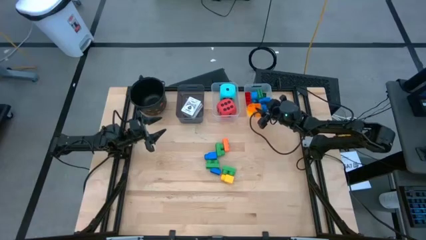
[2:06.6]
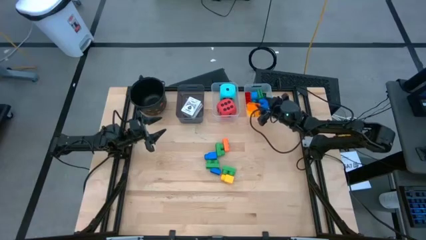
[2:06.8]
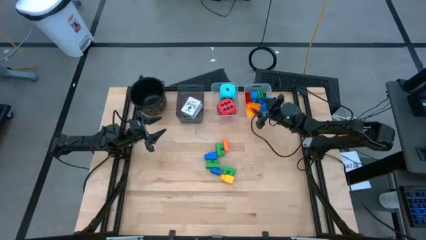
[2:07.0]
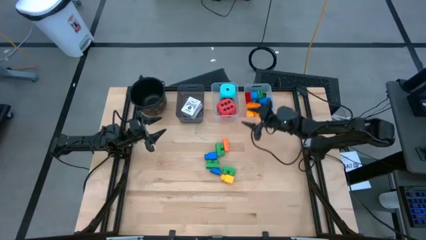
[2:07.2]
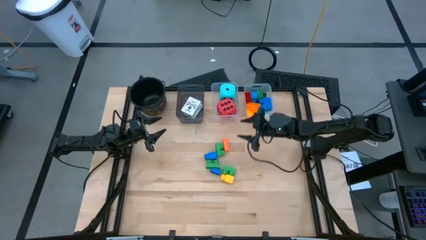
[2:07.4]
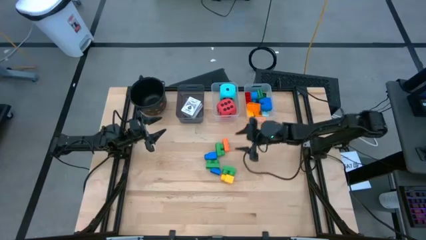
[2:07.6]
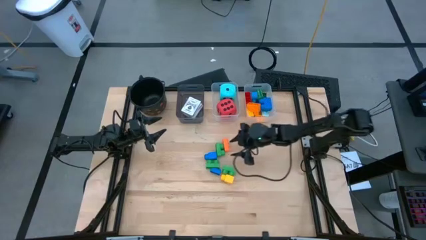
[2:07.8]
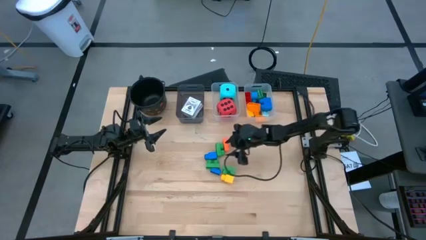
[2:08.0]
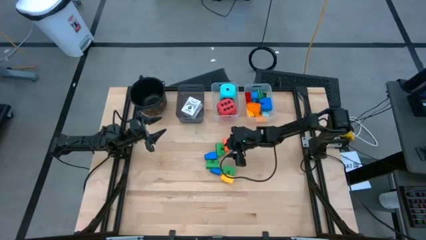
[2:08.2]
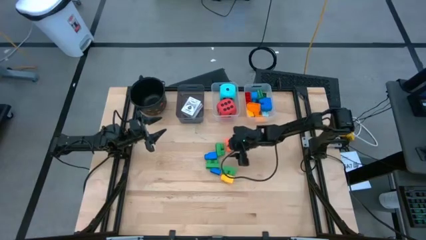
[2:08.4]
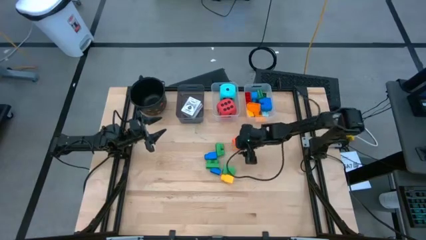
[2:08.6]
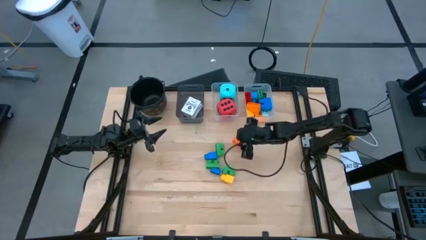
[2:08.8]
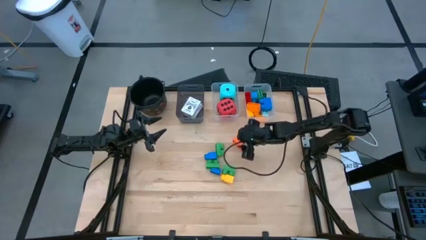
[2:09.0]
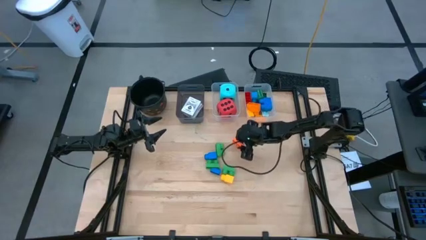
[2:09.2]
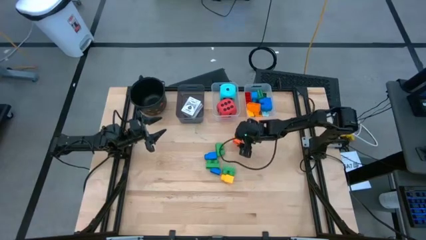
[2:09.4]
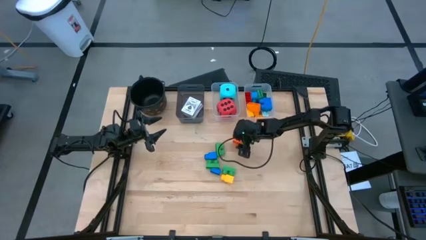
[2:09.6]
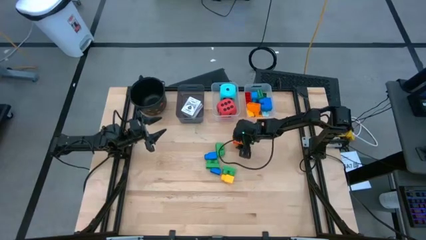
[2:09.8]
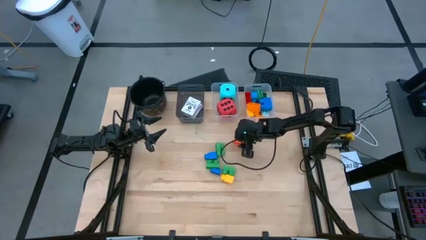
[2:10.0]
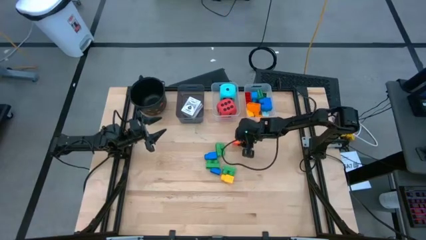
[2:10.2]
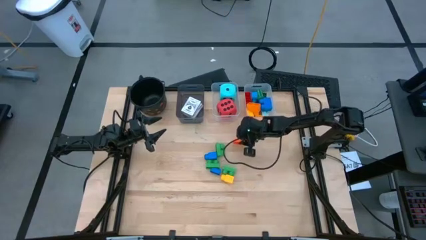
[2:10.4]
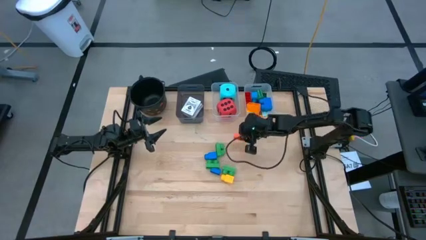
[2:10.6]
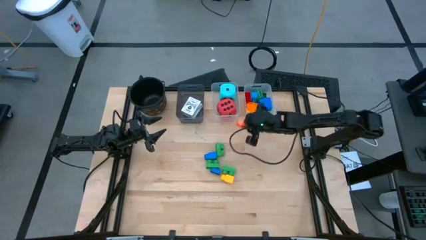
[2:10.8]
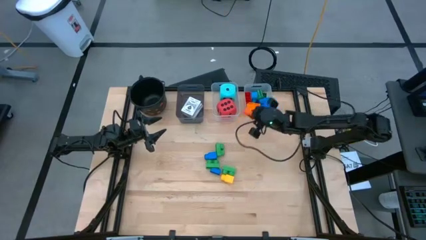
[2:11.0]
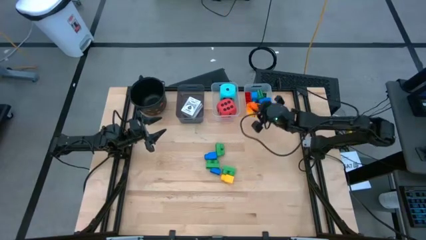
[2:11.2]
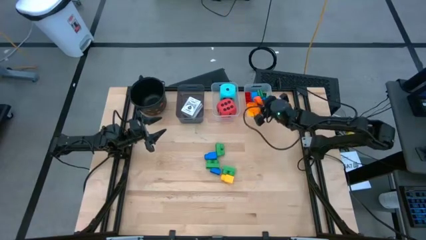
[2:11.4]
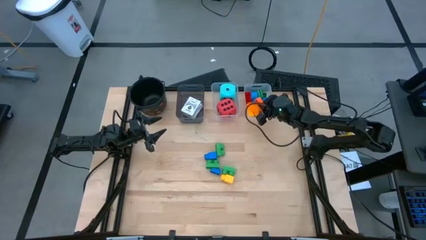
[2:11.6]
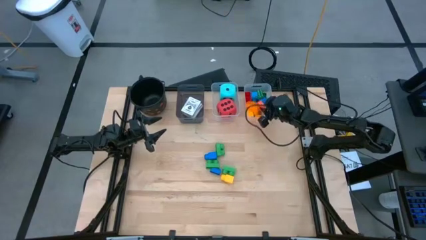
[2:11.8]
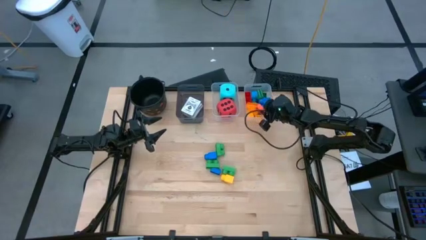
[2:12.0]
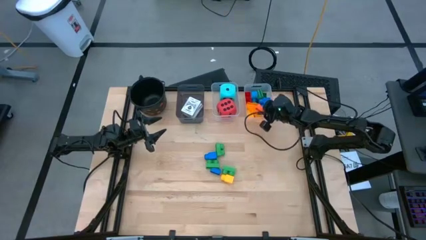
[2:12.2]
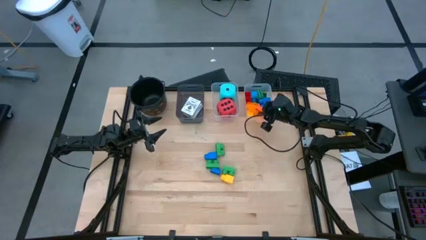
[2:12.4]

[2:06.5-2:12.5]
Task: Pick & Place Toys
Put the orange block into the right transparent bin

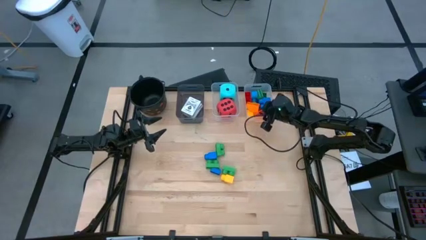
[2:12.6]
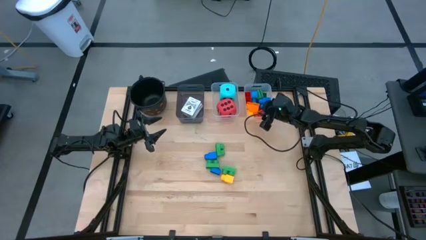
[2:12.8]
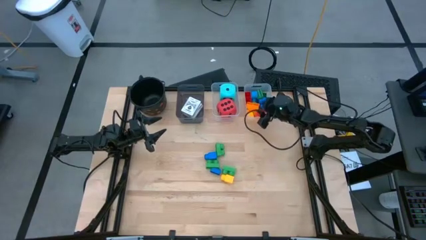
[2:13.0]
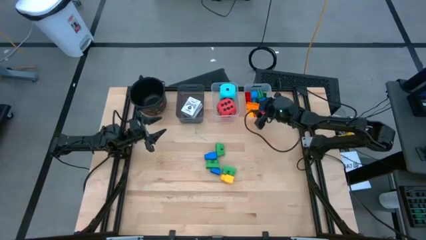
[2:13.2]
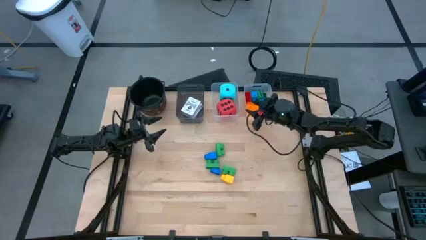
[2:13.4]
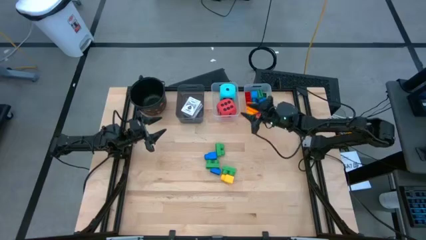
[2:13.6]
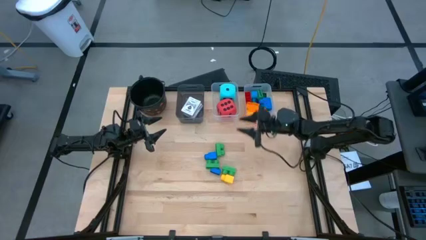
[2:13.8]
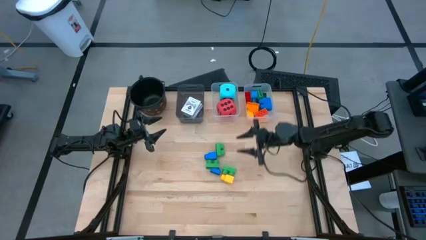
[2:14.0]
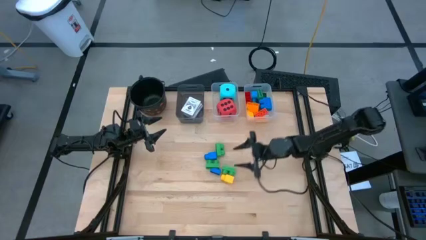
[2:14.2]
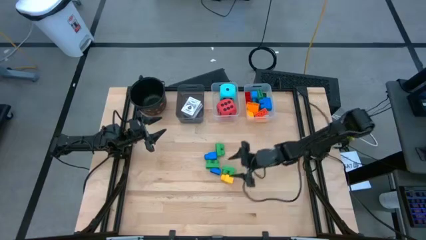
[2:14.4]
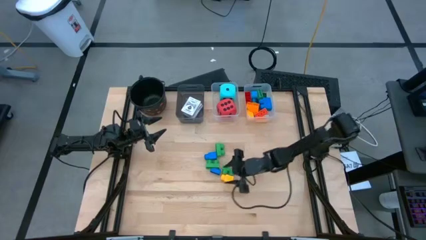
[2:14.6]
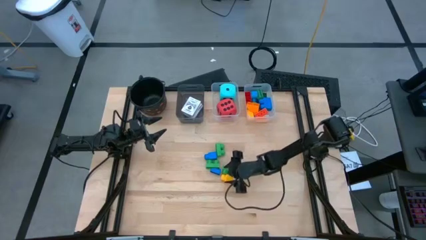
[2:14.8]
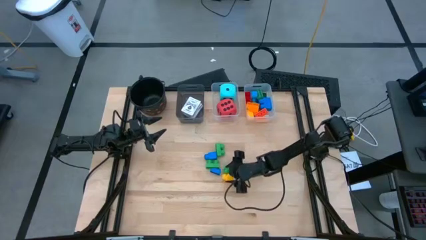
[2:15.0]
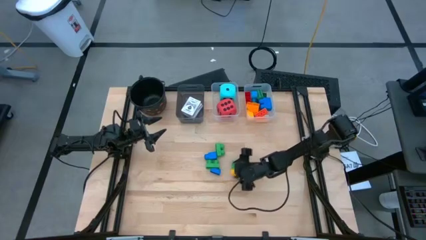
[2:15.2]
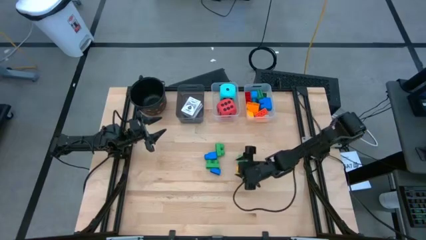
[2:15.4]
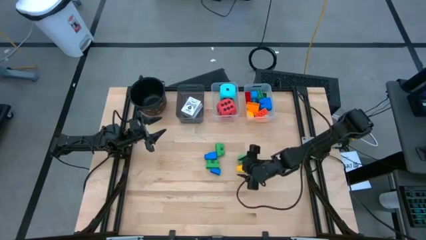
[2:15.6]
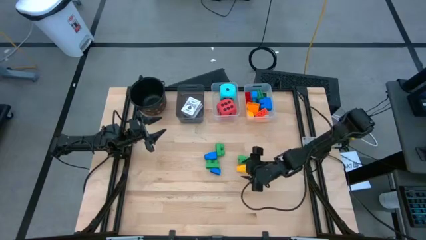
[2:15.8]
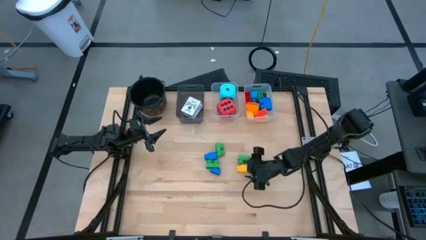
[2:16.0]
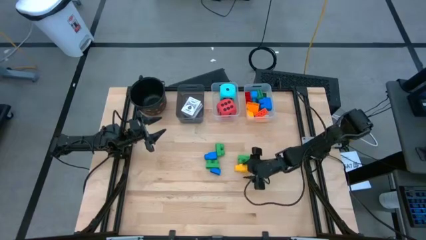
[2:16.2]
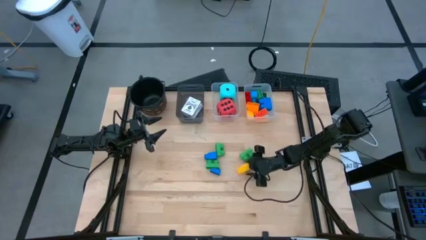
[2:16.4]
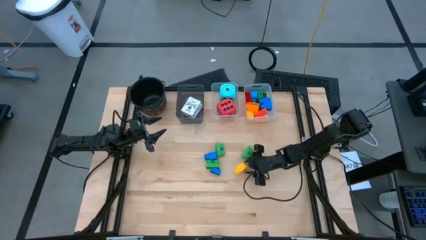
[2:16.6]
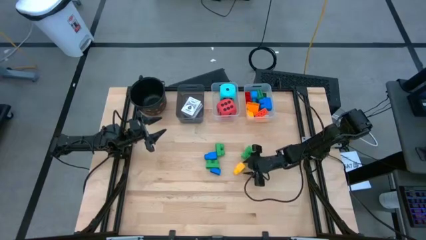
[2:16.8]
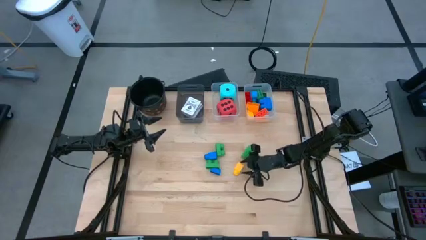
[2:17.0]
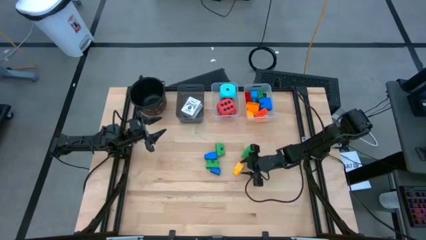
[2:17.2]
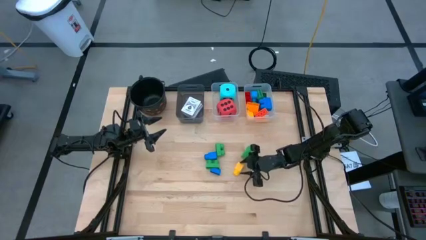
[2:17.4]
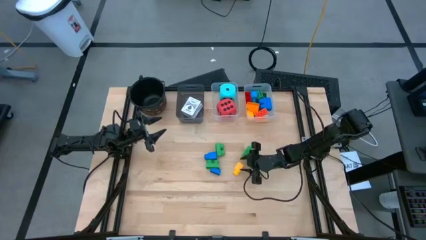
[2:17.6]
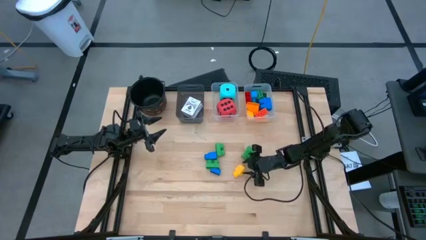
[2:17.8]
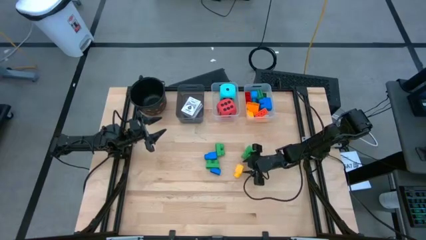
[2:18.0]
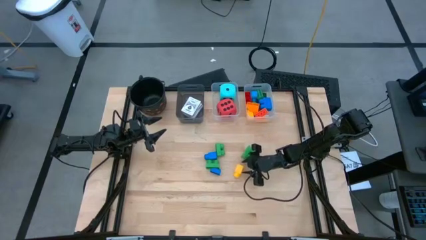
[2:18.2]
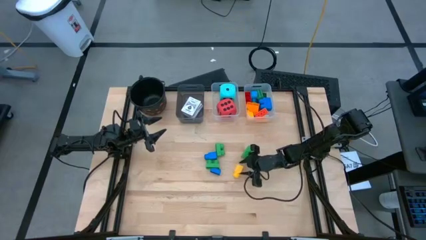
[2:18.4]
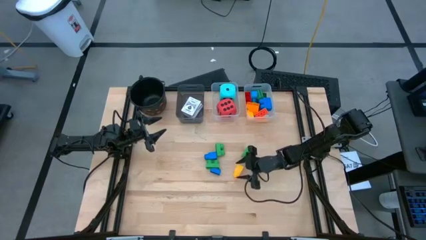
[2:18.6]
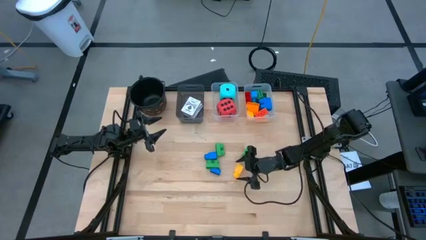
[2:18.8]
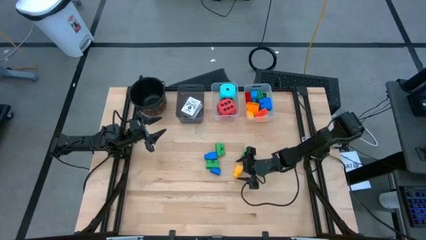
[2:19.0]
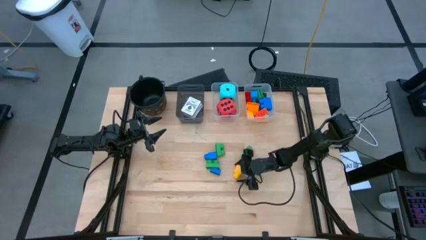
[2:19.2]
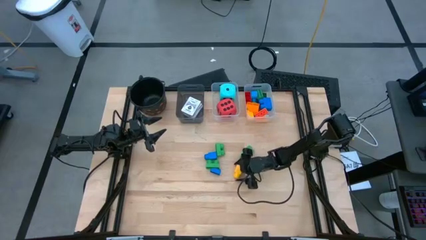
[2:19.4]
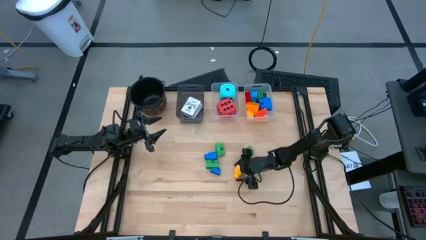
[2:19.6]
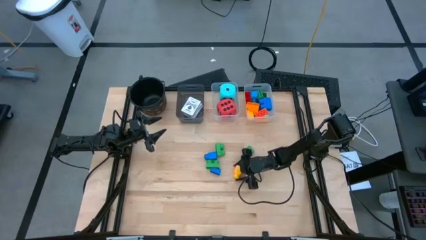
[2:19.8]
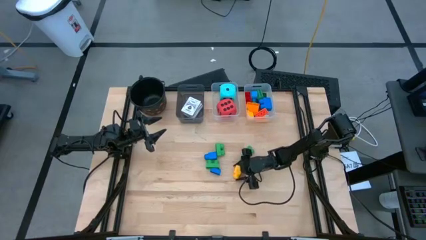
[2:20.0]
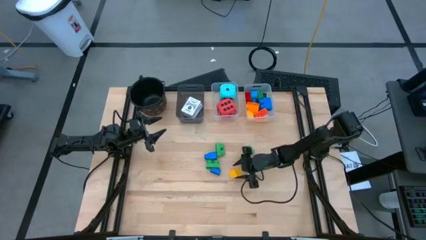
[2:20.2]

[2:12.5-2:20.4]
Put the yellow one stud game piece into the right transparent bin

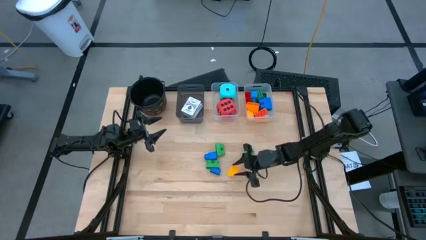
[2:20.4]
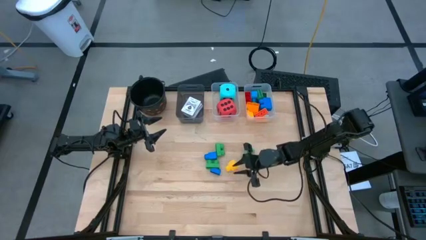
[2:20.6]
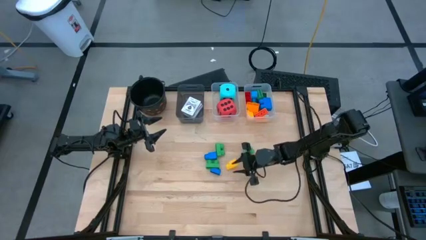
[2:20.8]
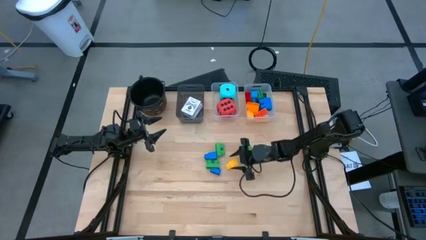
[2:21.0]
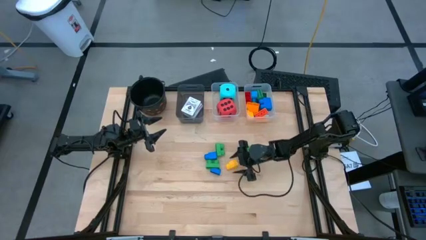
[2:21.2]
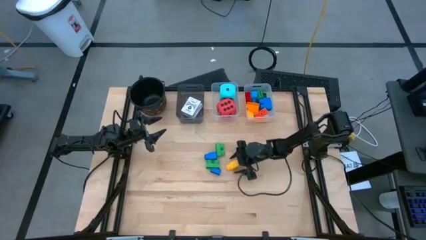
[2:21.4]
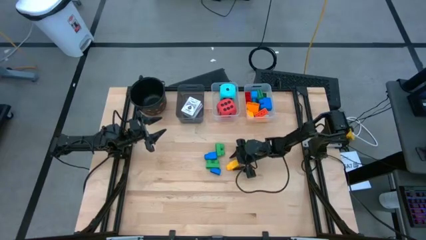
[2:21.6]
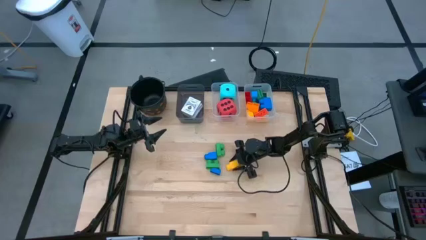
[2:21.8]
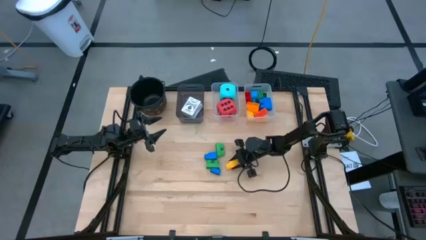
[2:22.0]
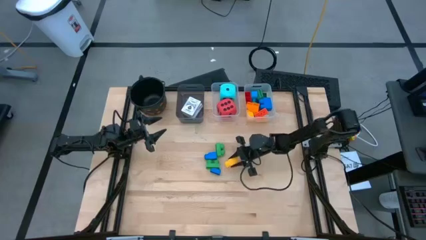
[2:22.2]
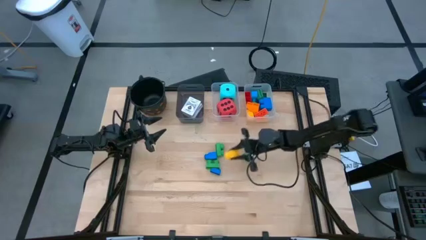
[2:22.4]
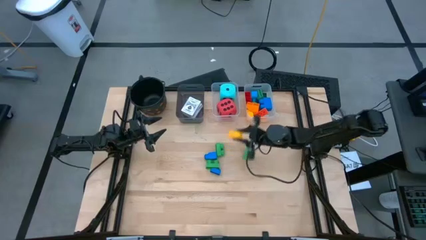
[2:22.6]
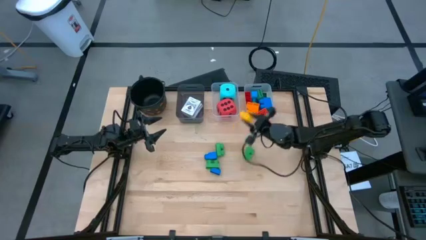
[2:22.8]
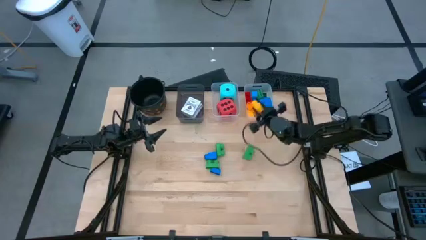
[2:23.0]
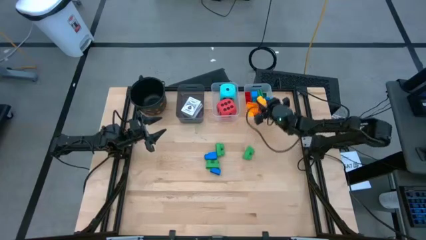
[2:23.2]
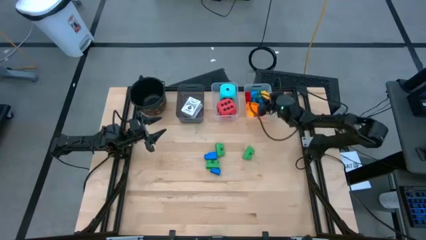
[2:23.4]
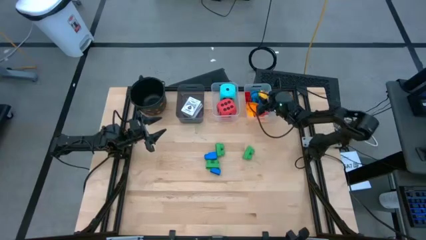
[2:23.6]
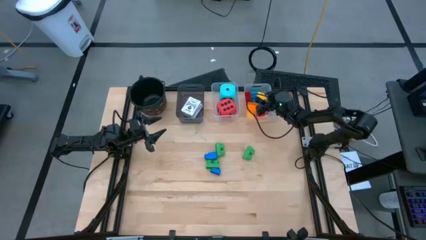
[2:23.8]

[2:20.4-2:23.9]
Put the yellow one stud game piece into the right transparent bin
